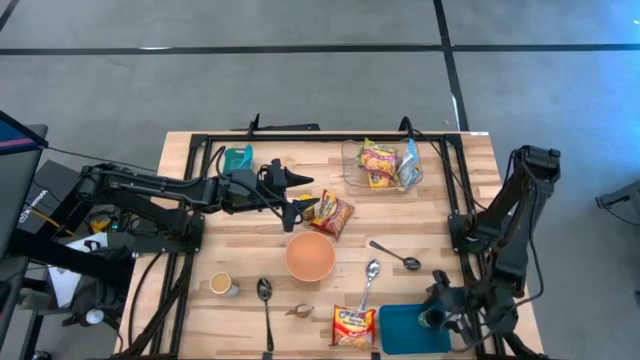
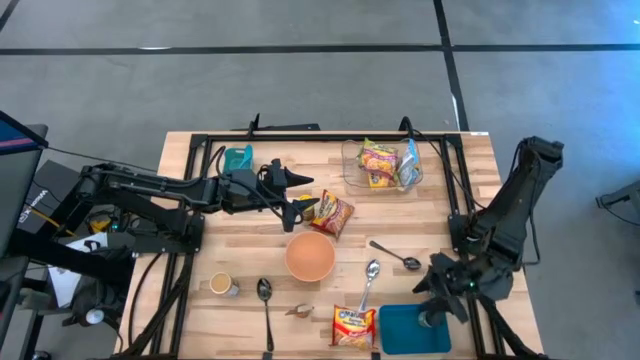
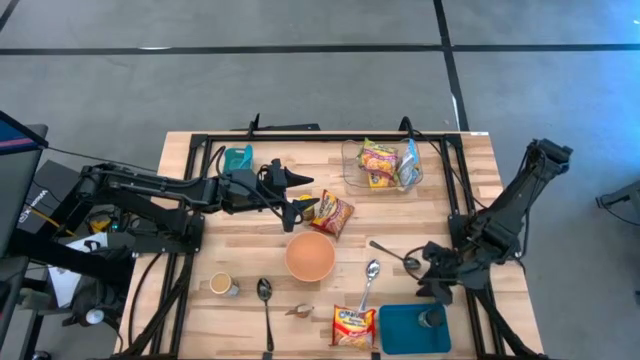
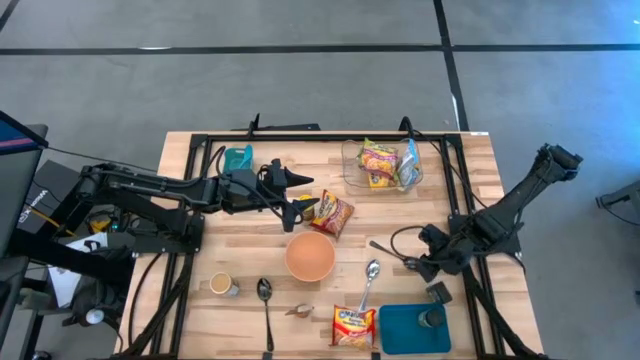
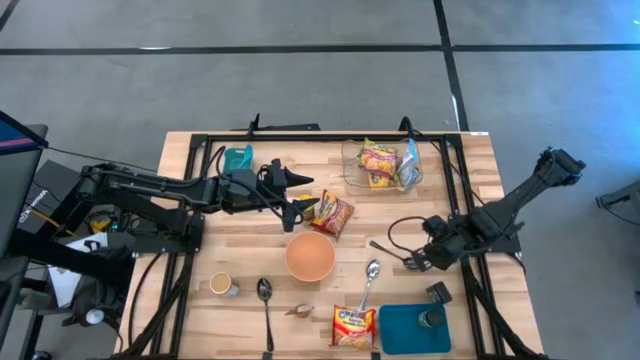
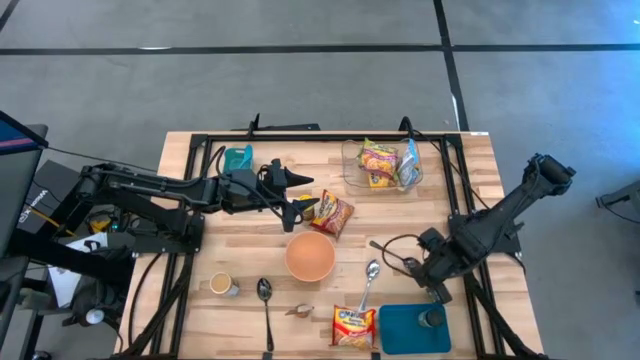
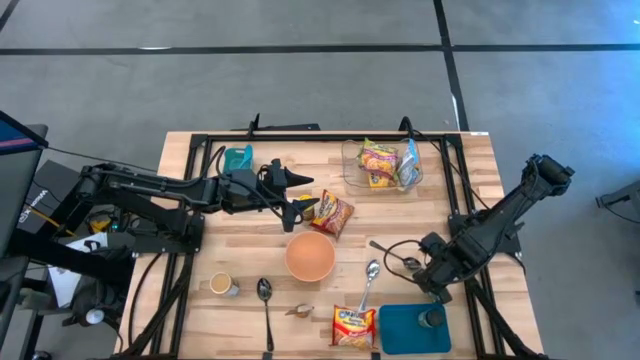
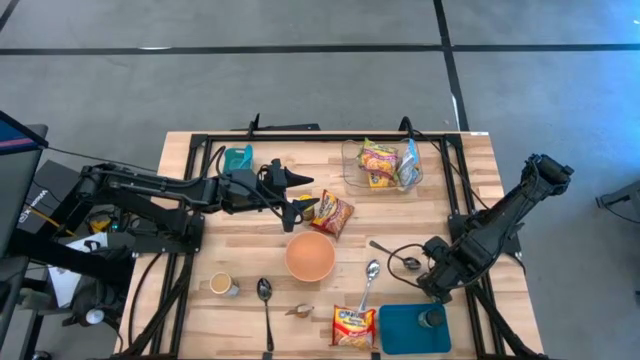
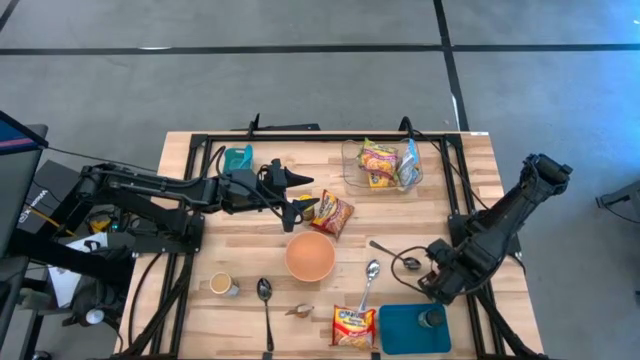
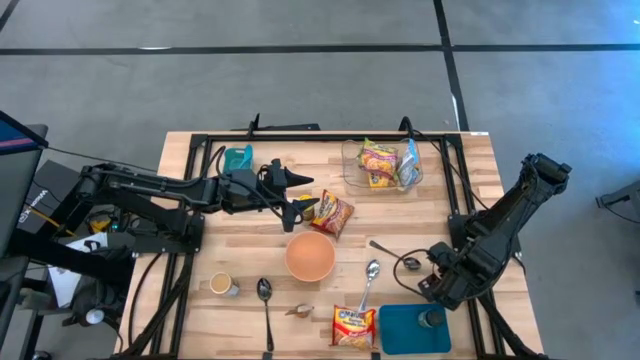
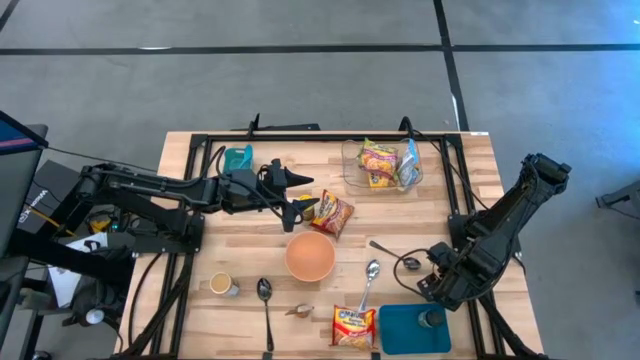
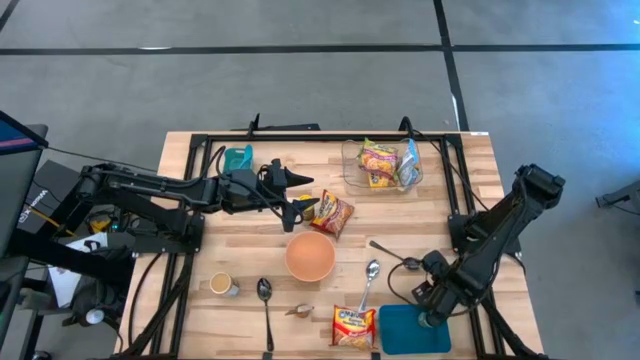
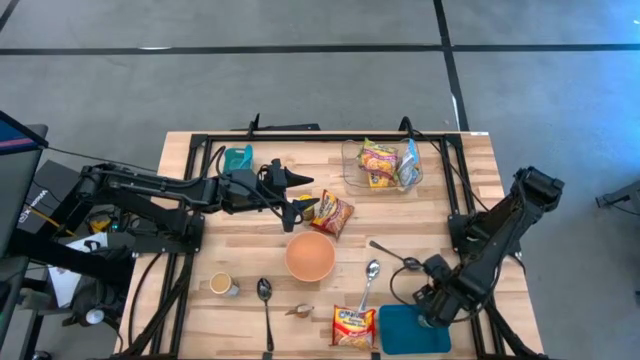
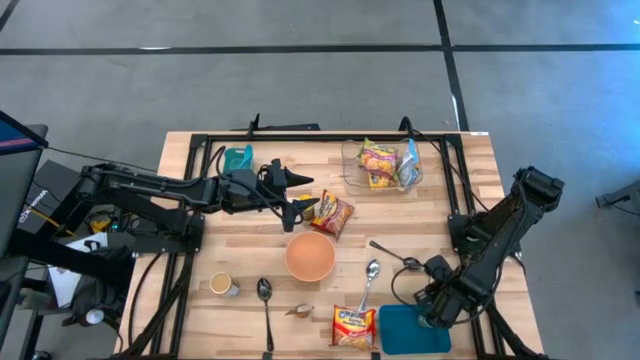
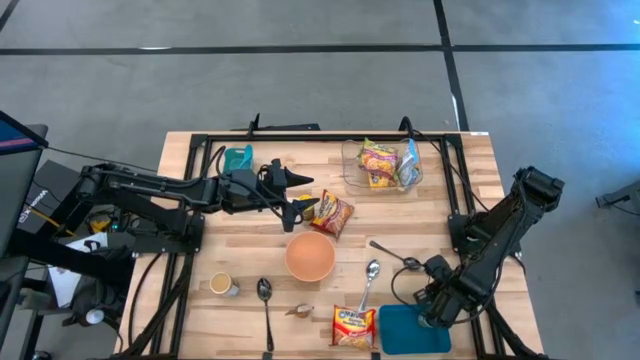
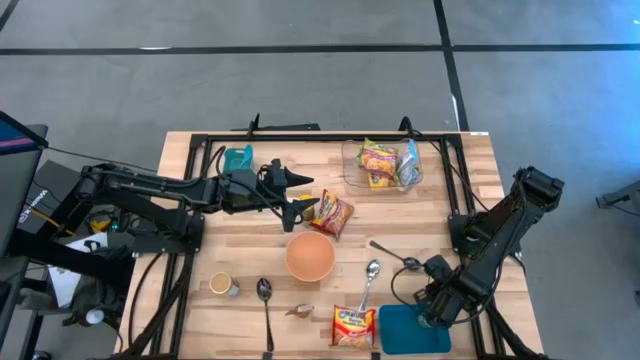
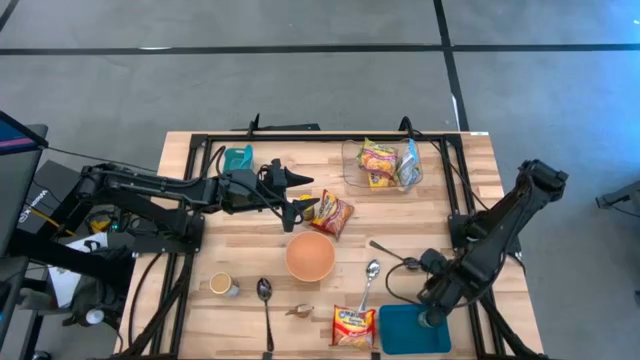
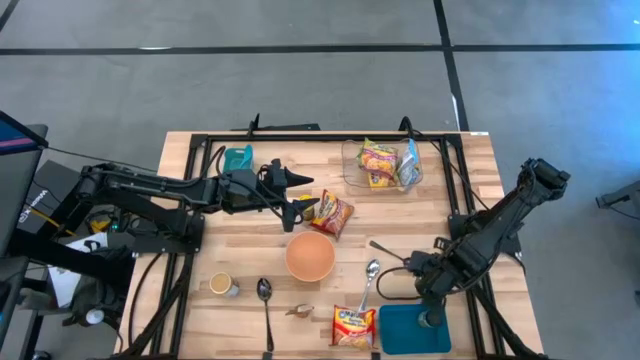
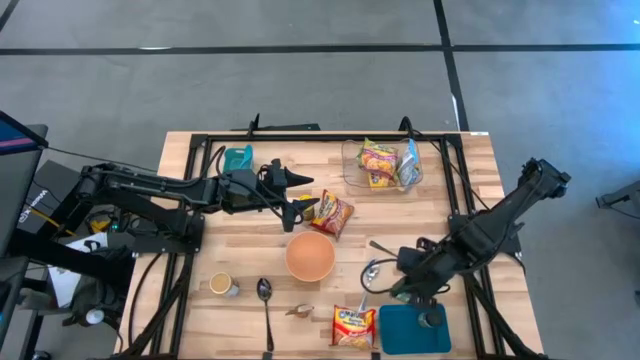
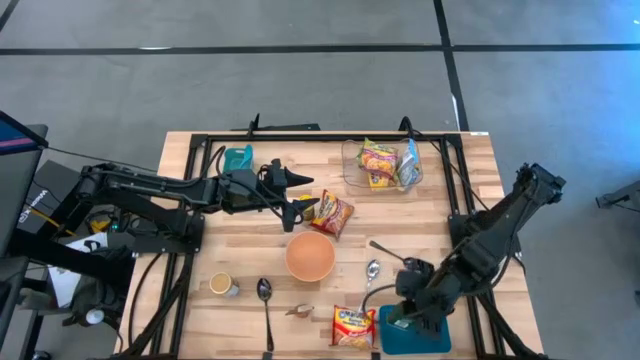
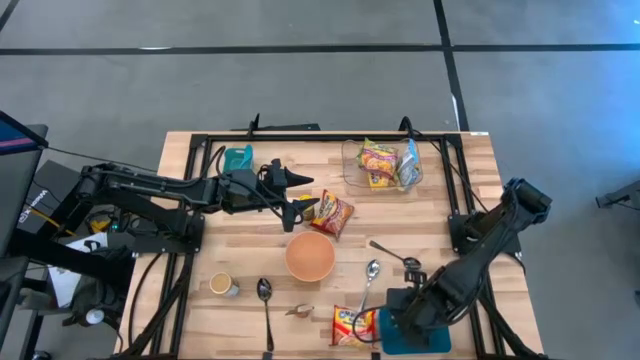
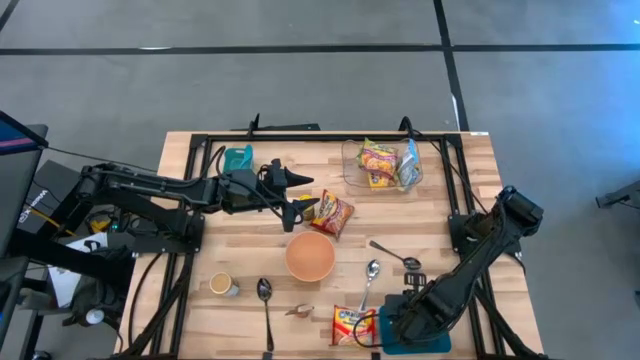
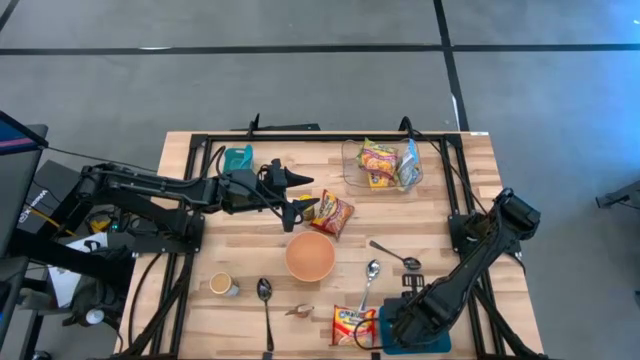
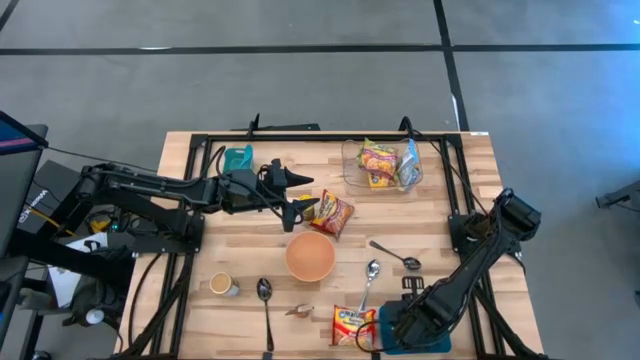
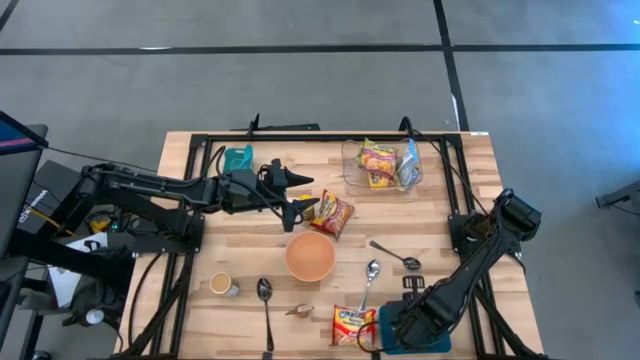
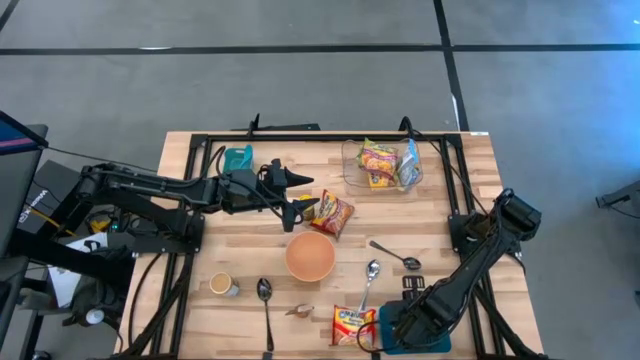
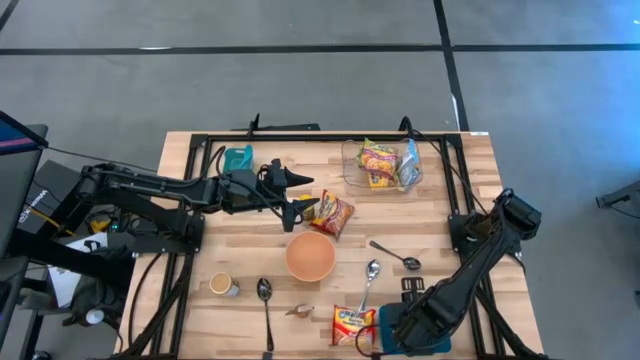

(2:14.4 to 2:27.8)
Task: Pick & Place Food Item
Put the dark green seasoning can into the dark blue bin

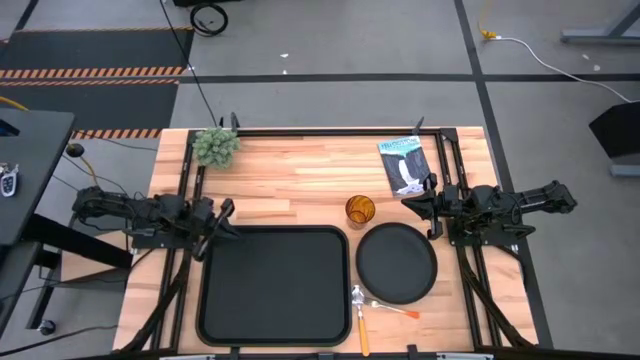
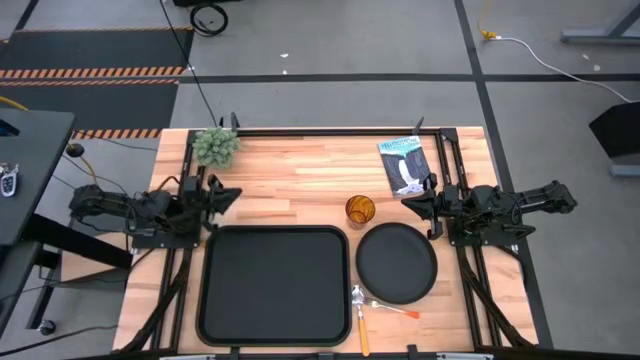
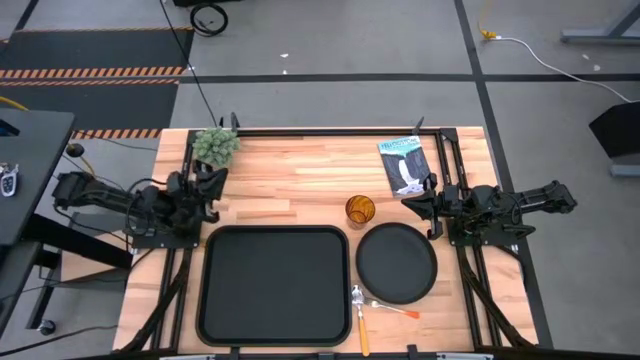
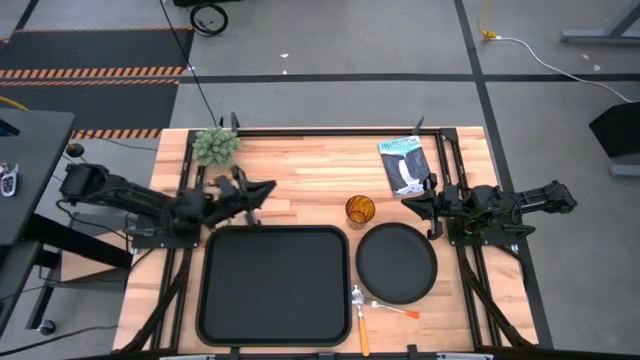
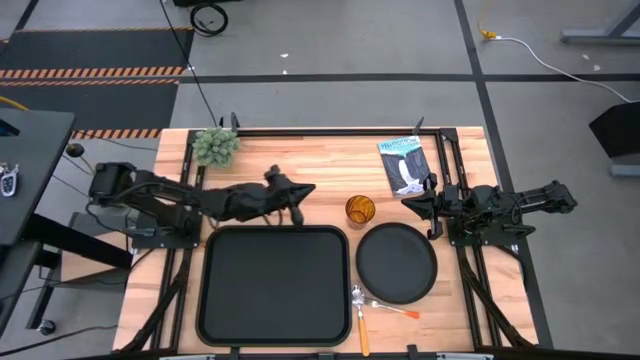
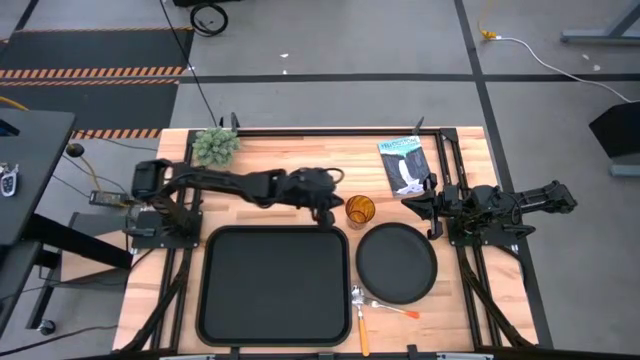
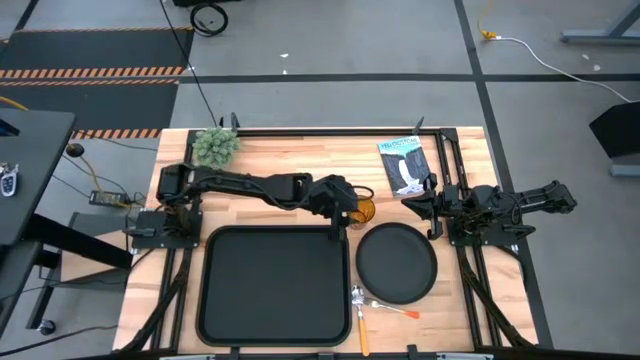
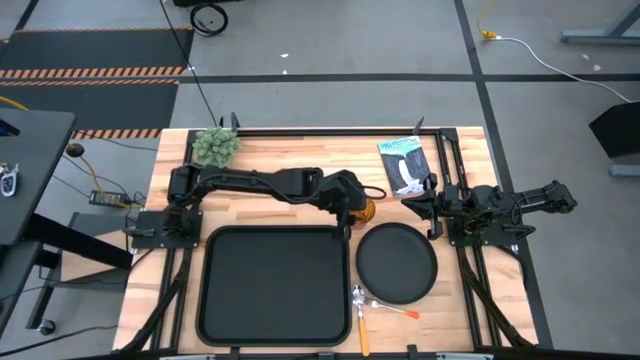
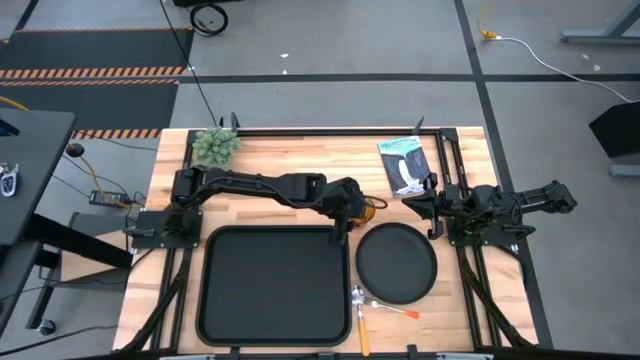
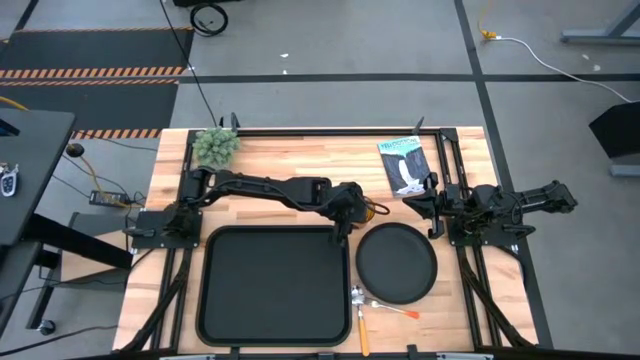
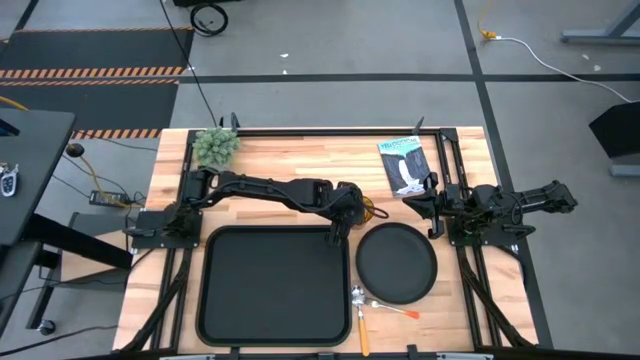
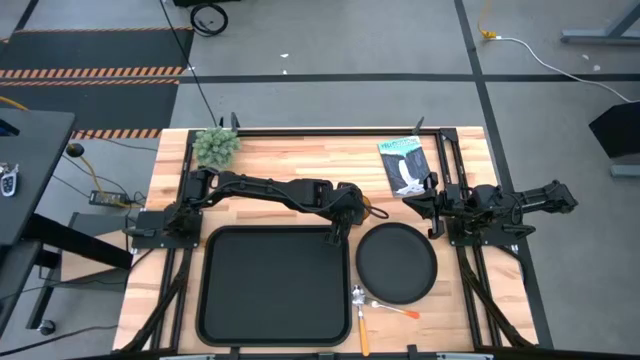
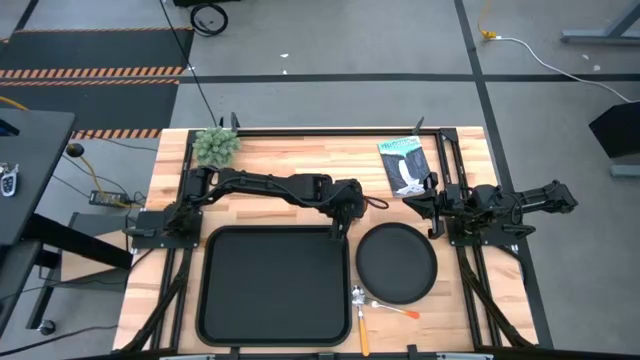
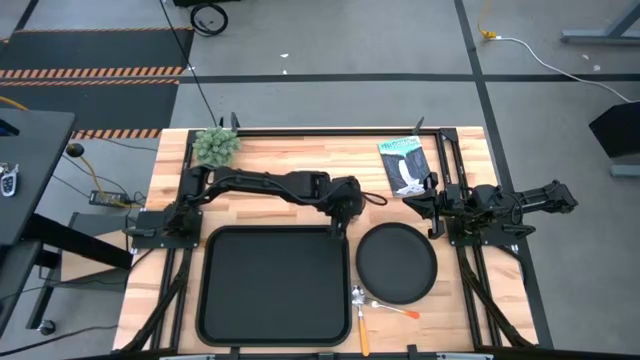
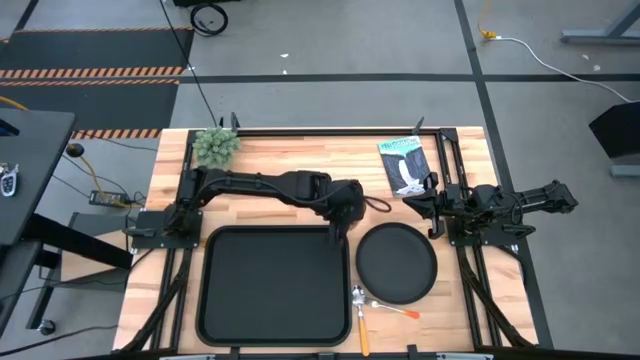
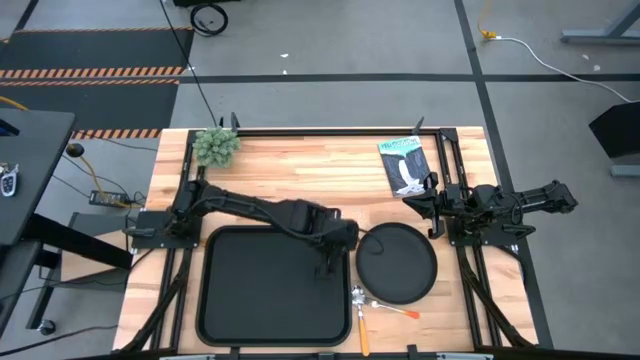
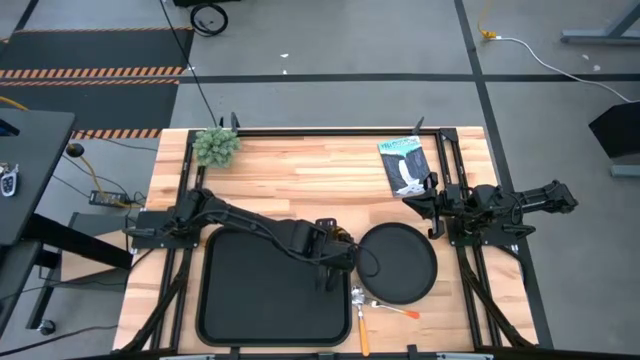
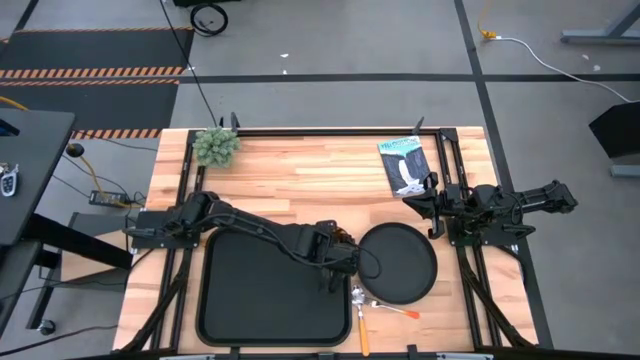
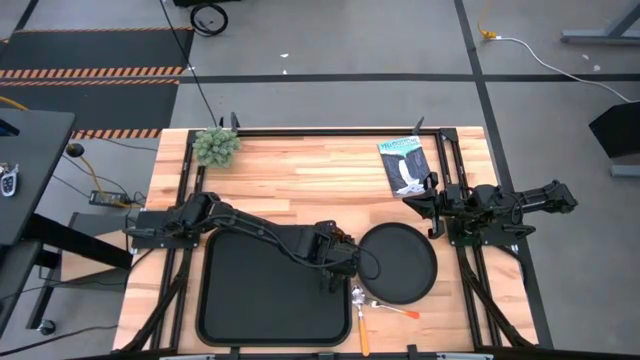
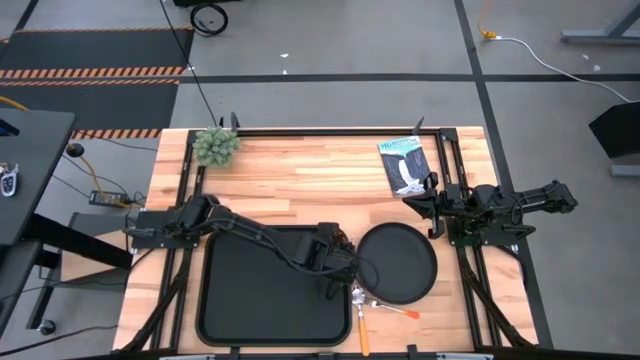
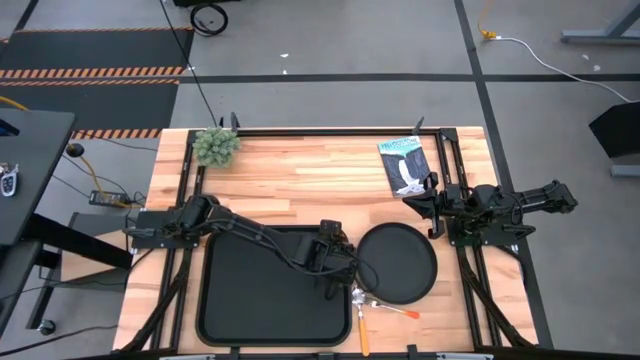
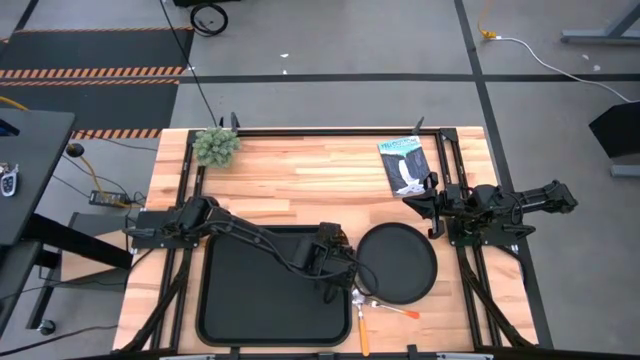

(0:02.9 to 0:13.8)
Task: Pick and place plate/cup/fork/spoon on tray
Put the yellow glass on the black tray
